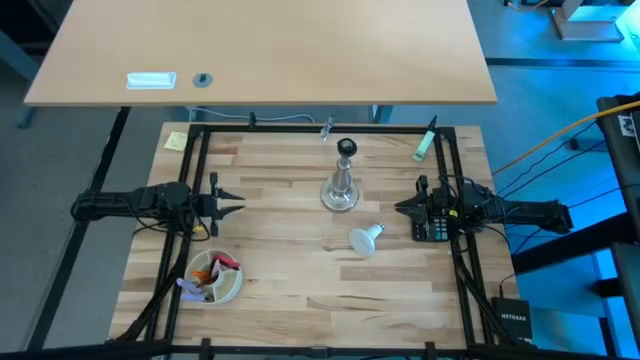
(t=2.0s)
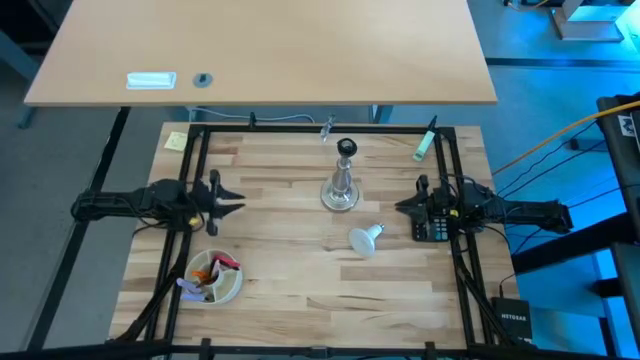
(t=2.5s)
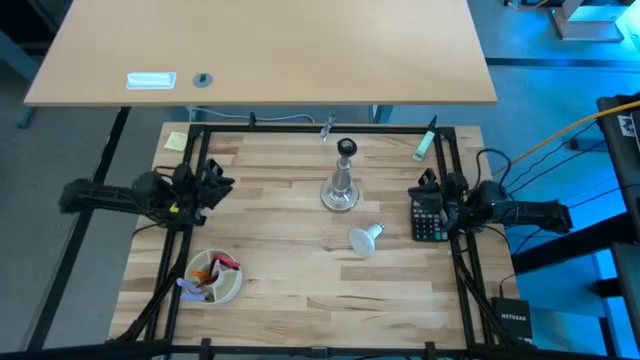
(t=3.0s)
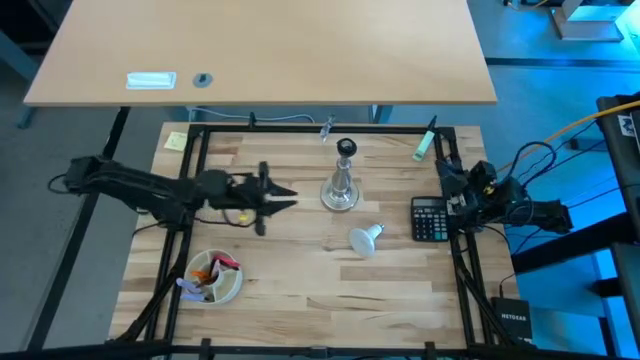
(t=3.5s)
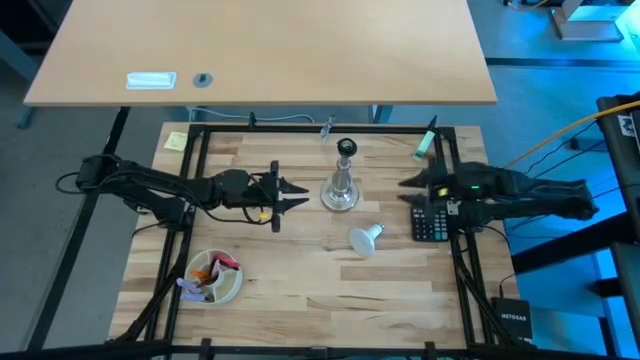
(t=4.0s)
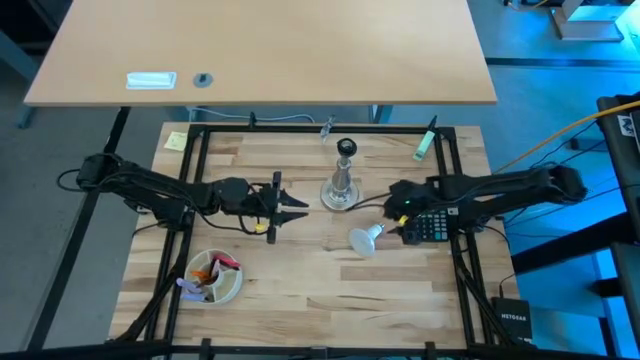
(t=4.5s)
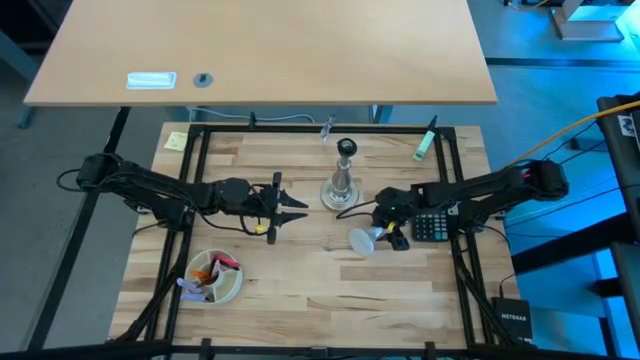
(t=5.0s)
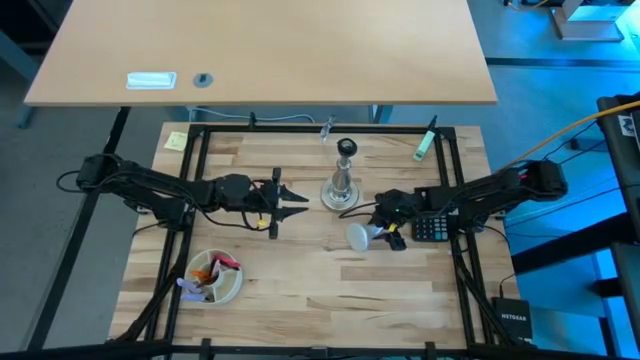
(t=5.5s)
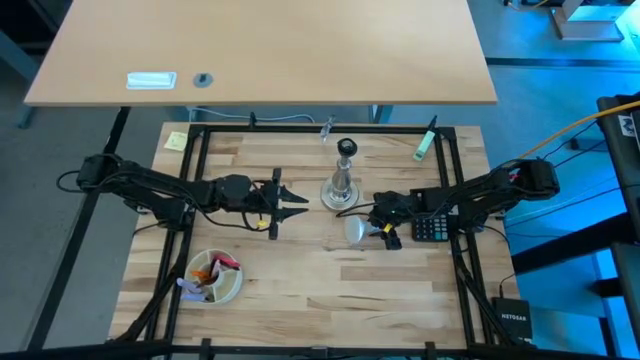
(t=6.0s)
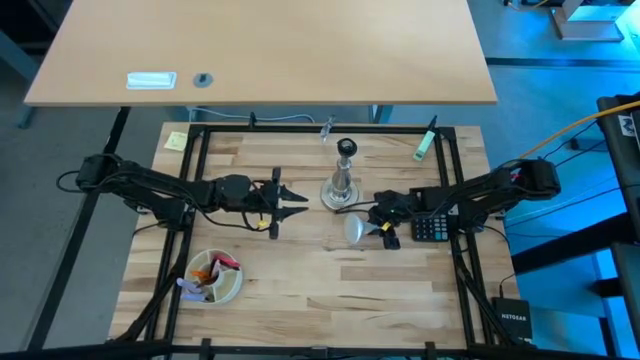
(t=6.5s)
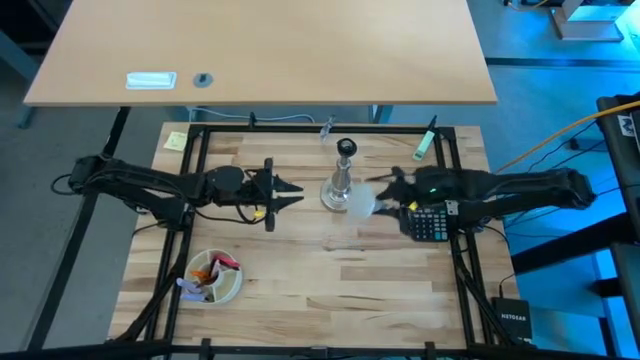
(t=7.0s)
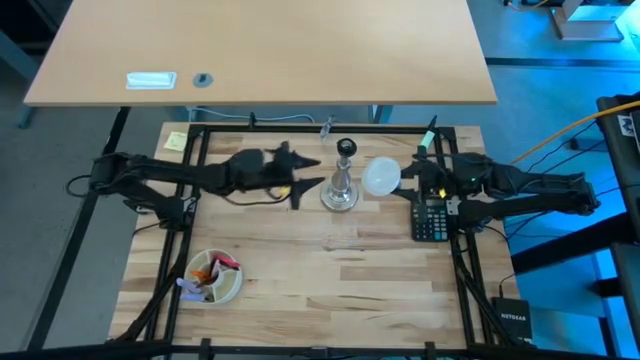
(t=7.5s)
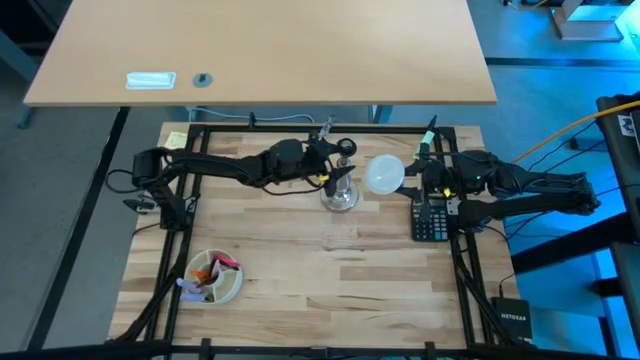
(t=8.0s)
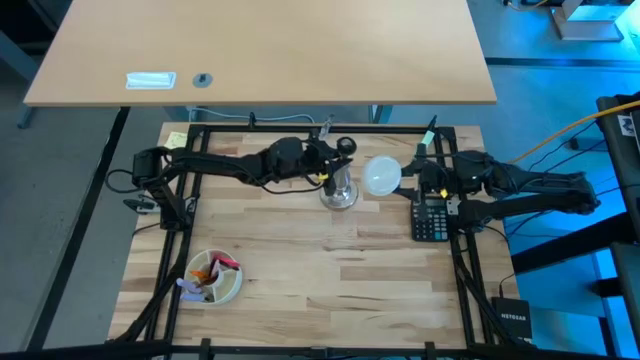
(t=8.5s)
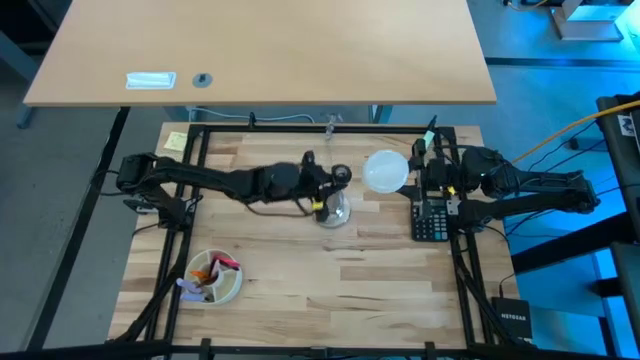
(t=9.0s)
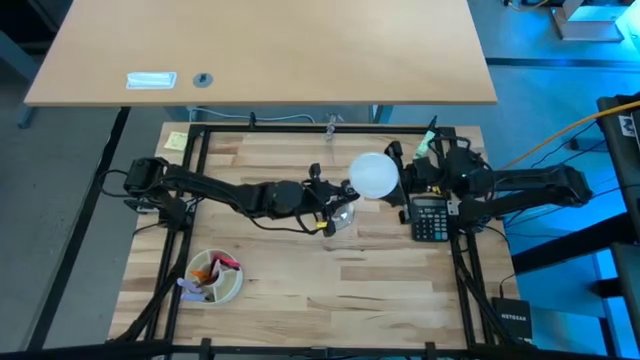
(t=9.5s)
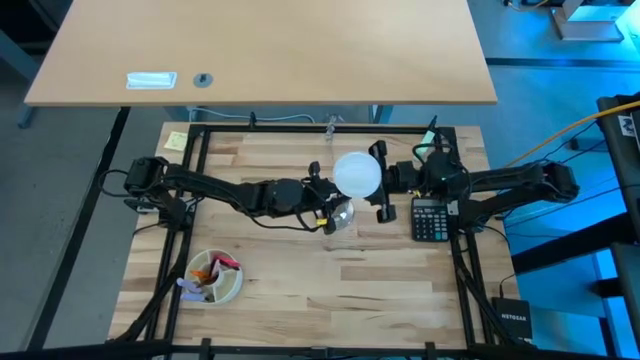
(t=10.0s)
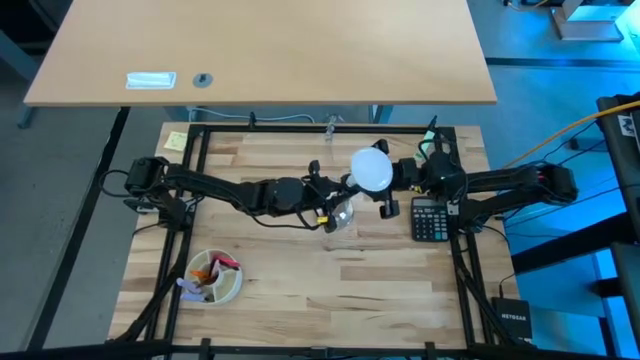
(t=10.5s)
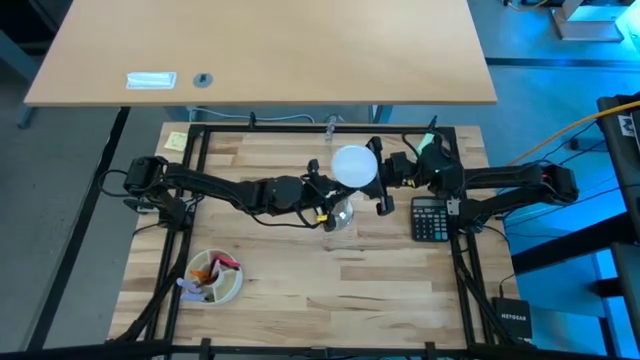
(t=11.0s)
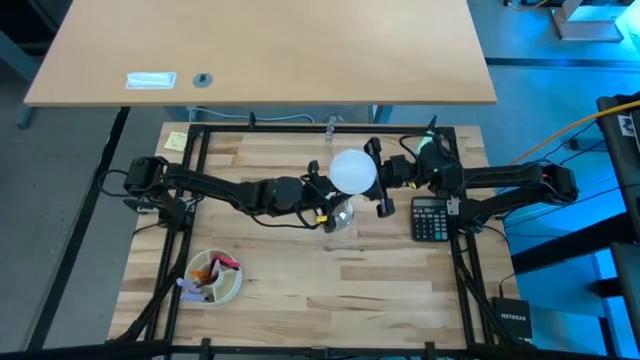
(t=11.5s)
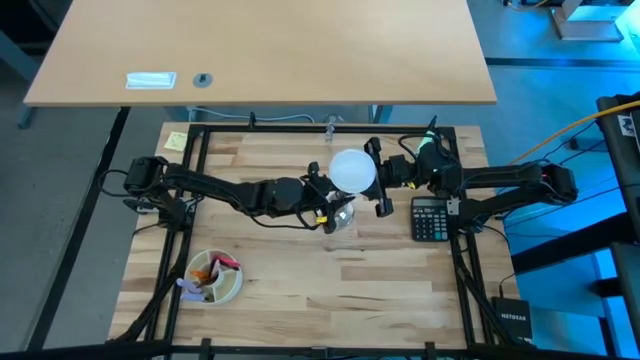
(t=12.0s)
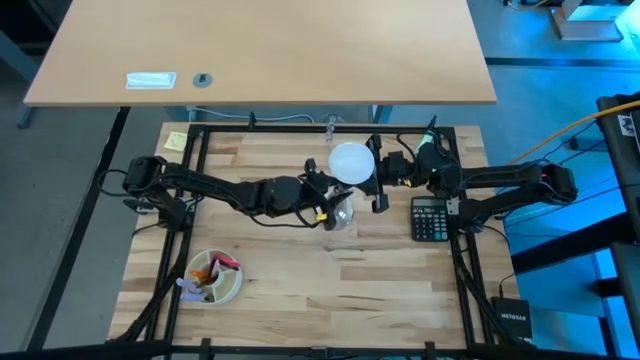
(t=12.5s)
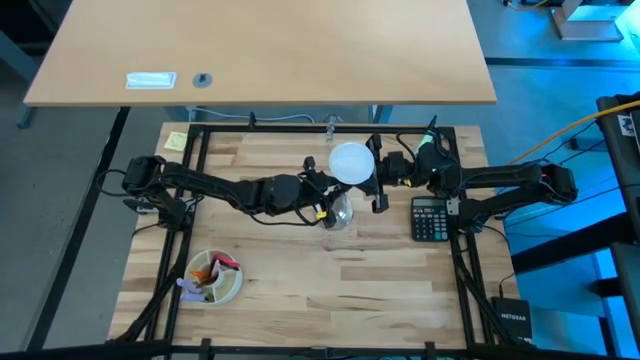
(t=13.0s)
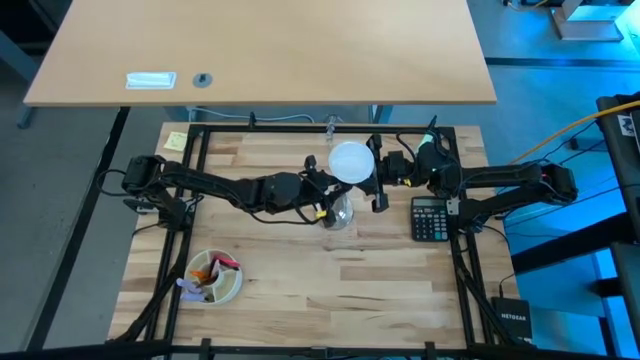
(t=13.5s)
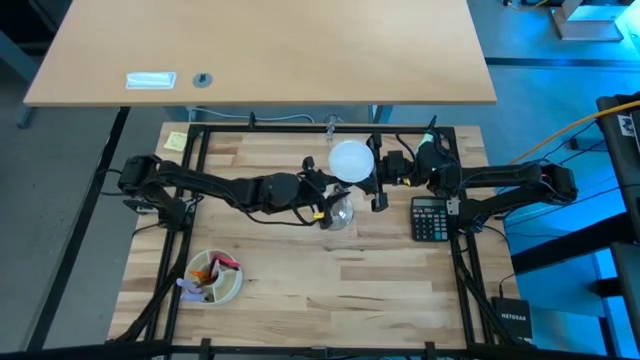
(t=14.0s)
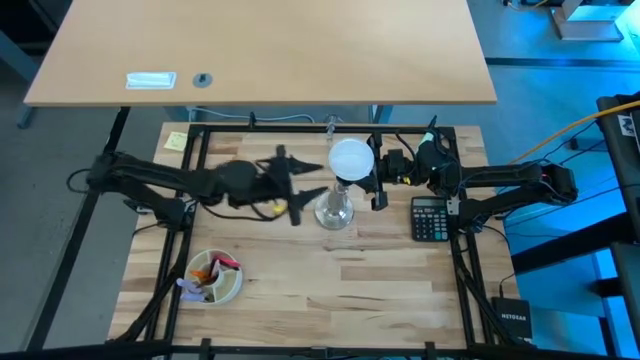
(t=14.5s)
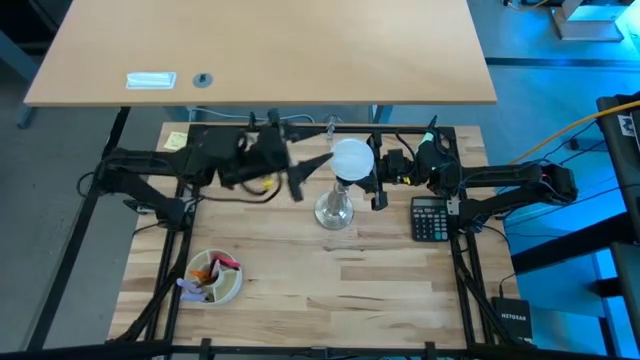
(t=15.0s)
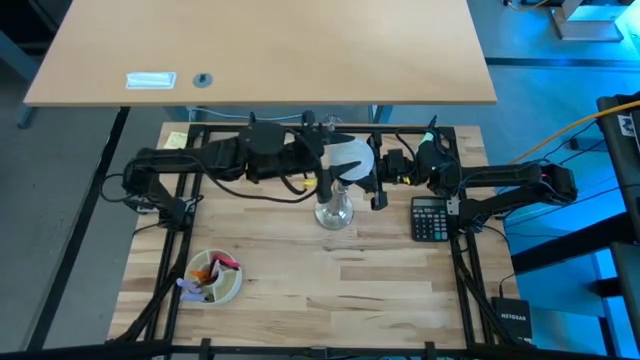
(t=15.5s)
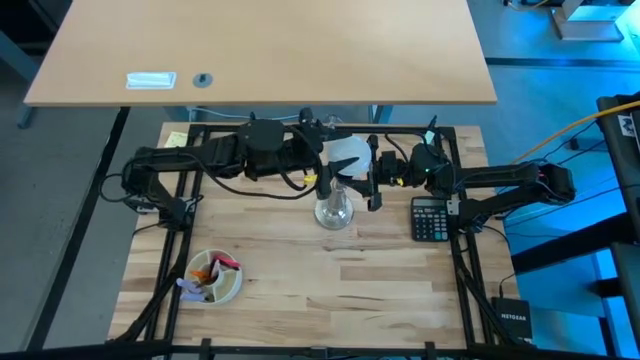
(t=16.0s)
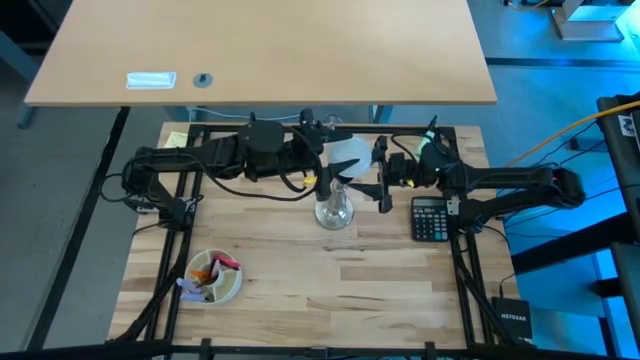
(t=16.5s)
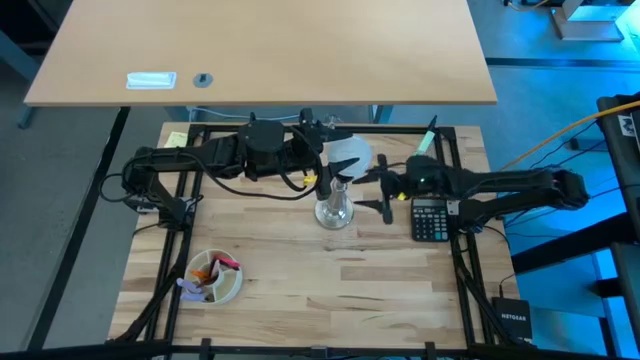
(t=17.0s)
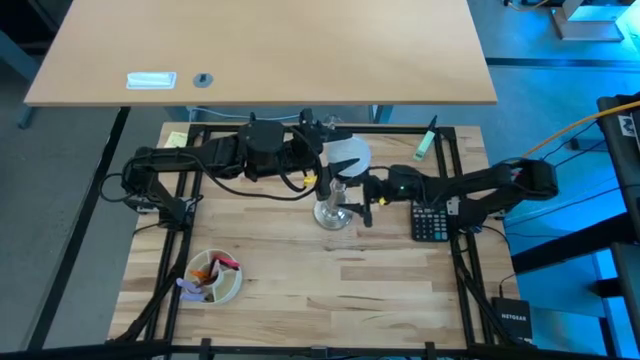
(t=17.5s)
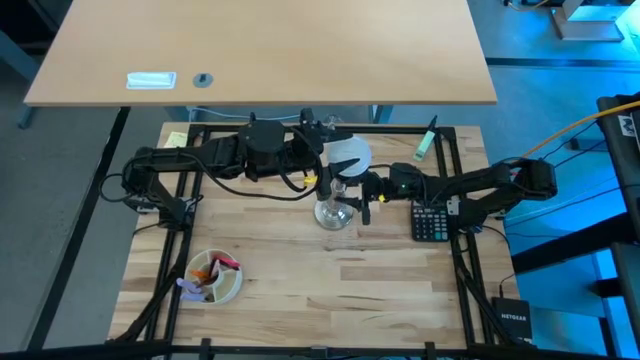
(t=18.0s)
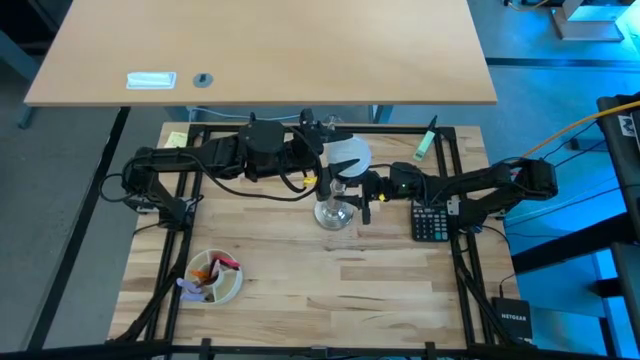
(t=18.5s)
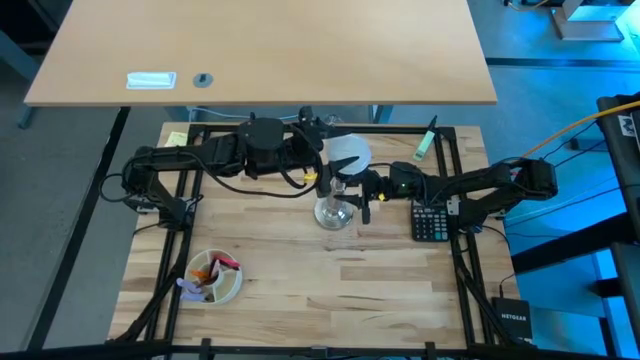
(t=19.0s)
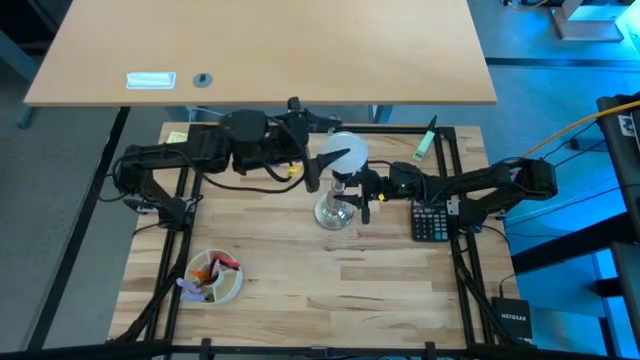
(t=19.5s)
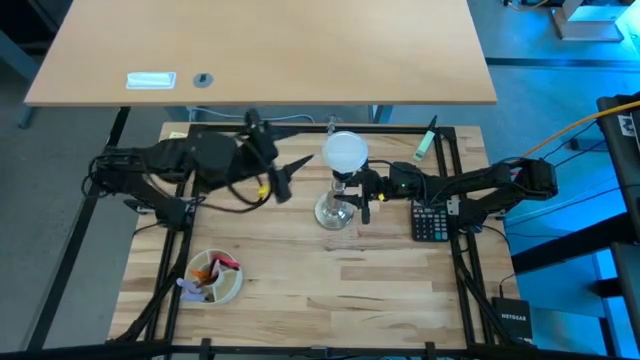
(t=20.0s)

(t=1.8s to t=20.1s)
Task: Screw lightbulb
Insert the lightbulb into the silver lamp

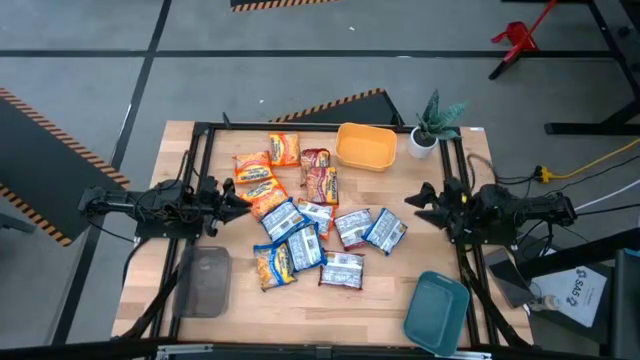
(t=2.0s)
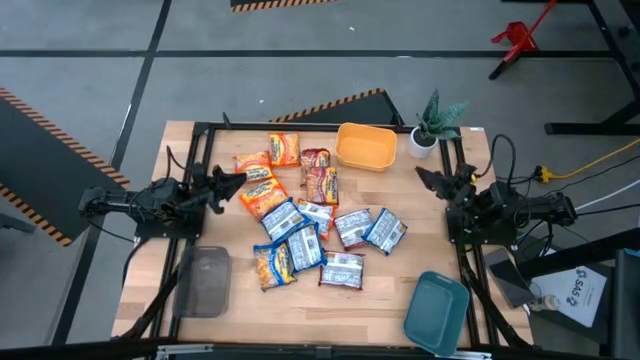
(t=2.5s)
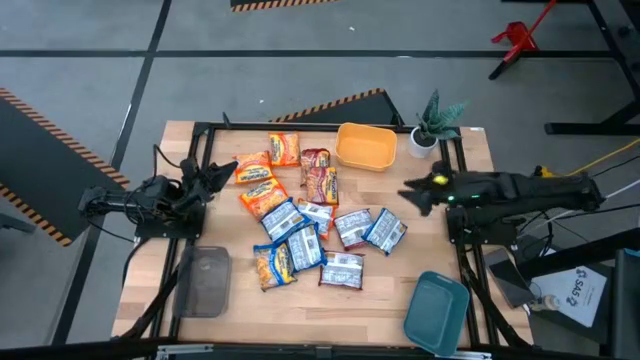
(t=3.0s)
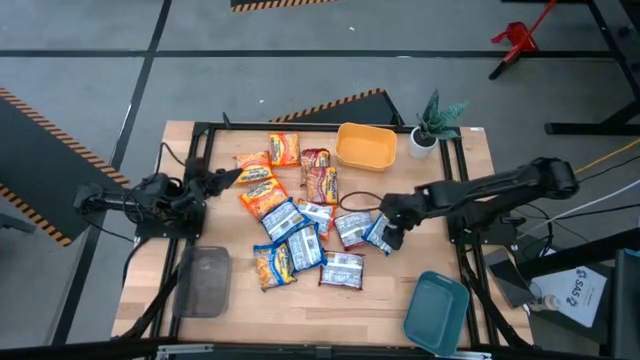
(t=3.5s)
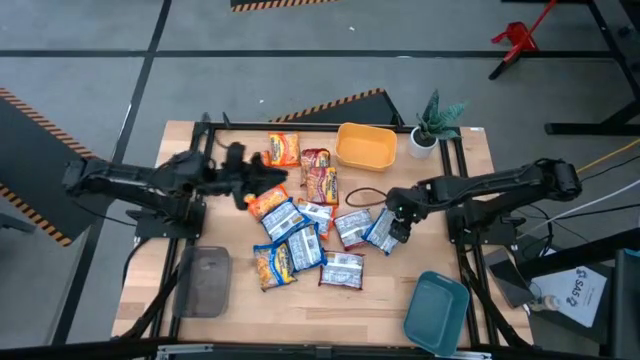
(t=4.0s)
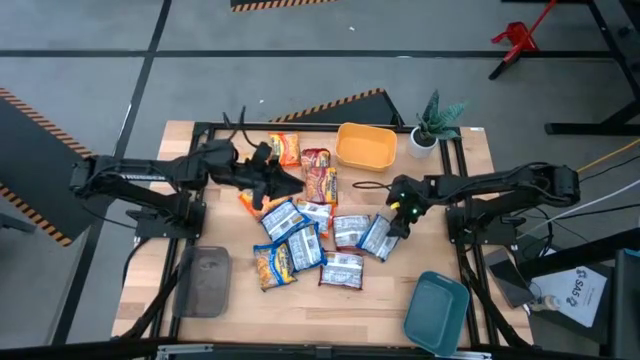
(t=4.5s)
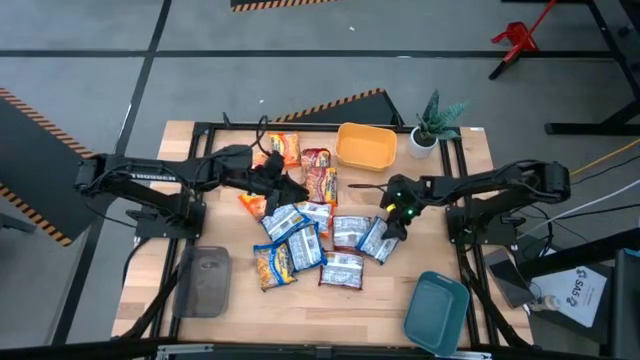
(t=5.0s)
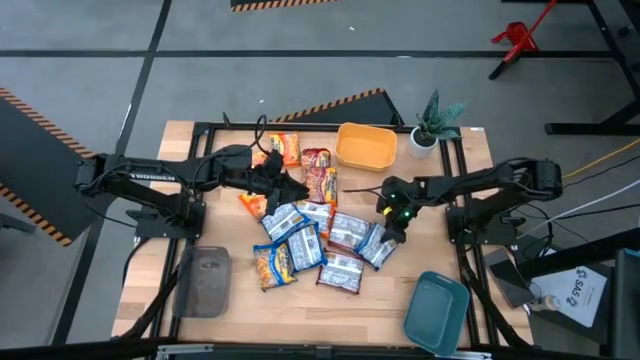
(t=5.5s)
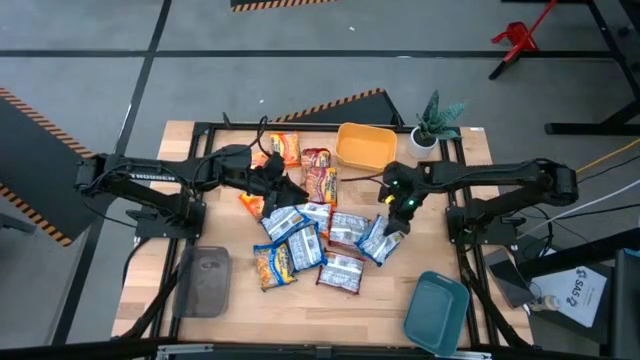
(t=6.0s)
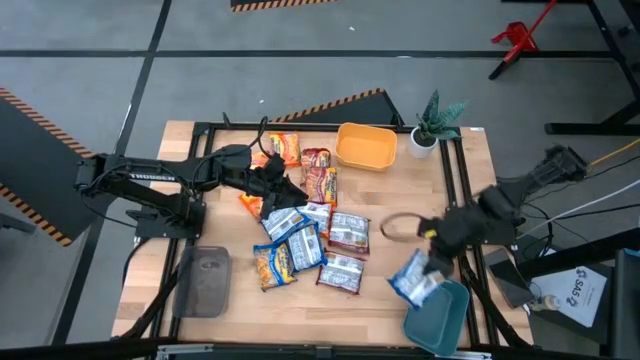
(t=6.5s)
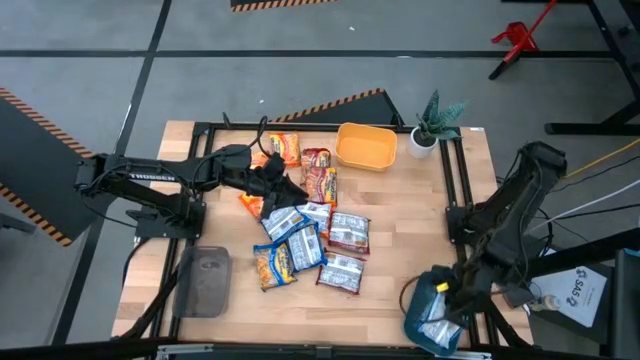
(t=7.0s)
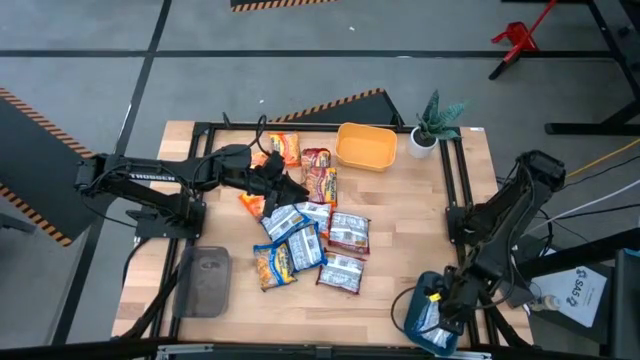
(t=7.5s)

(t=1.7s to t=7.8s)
Task: Sort Maruchan noodles
Put the blue noodle pack into the blue bin
